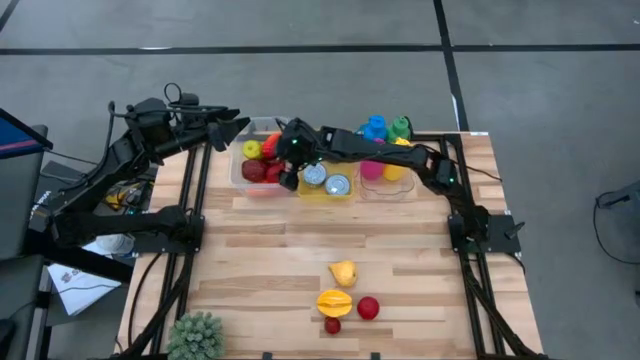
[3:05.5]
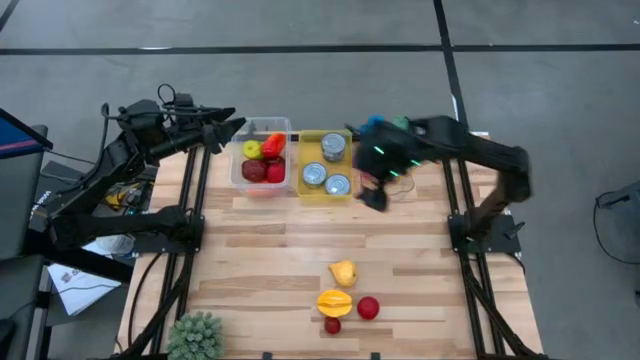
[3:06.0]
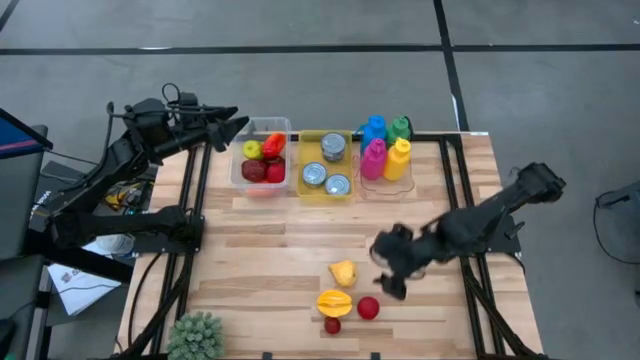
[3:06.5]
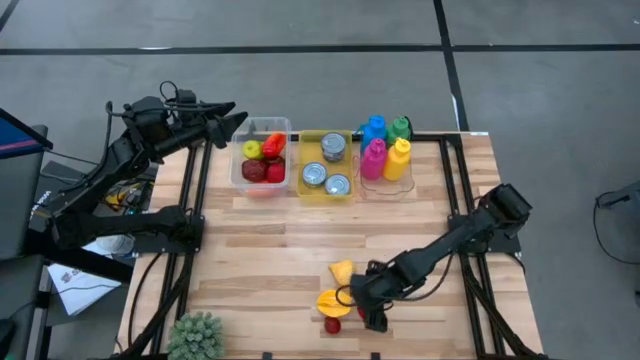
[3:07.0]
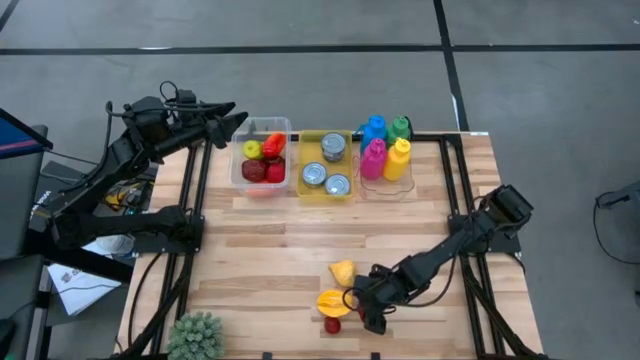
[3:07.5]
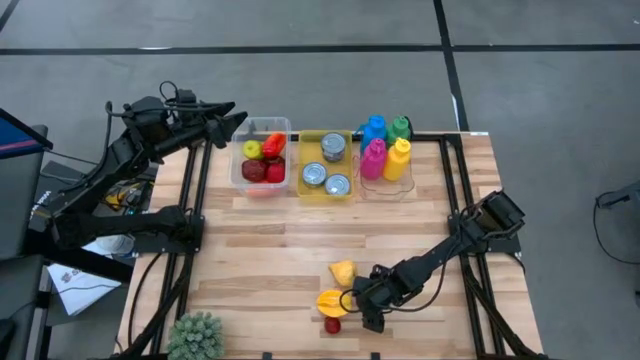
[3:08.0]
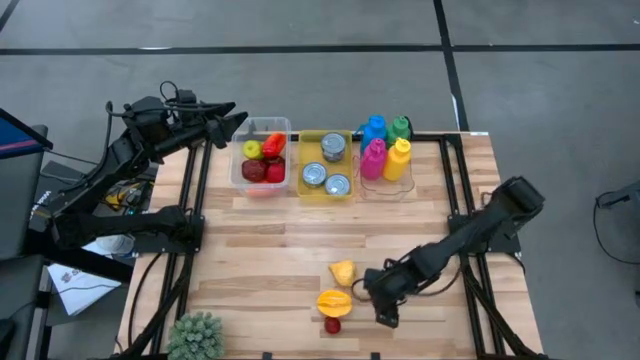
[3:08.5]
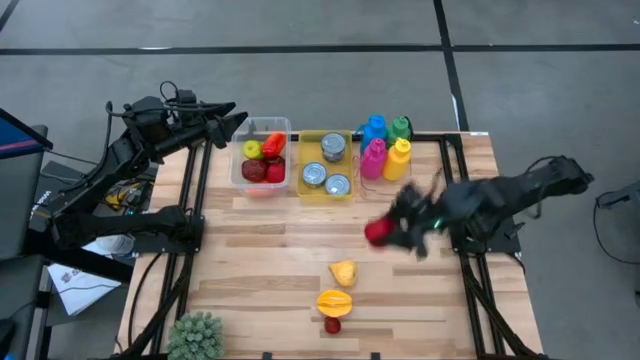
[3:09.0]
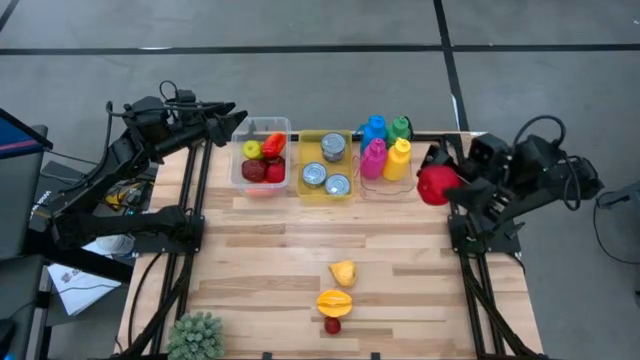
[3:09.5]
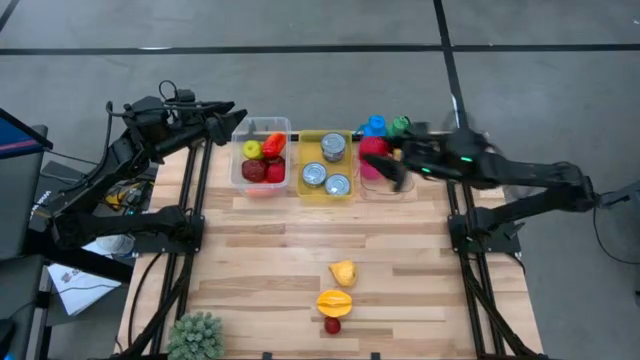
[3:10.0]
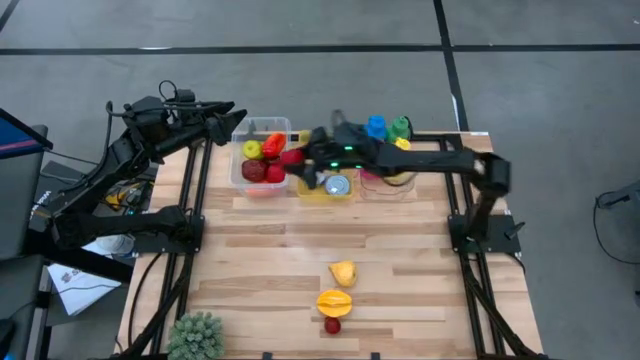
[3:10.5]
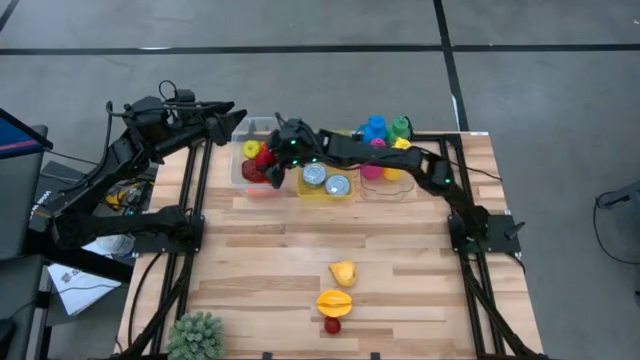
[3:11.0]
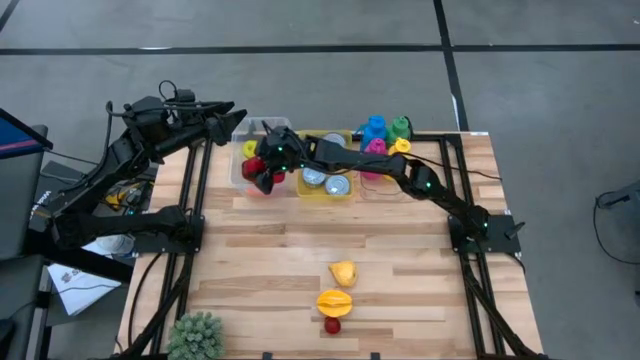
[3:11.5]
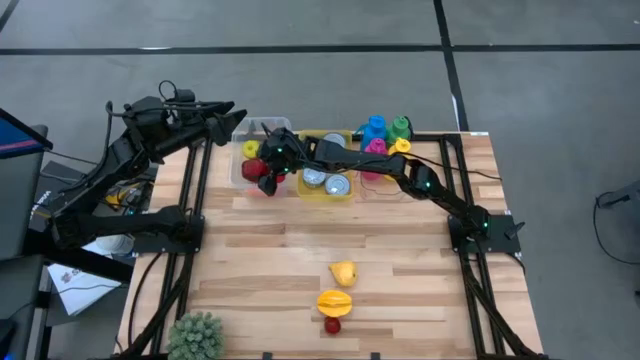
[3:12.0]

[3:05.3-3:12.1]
Task: Pick & Place Food Item
Put the tomato into the transparent container

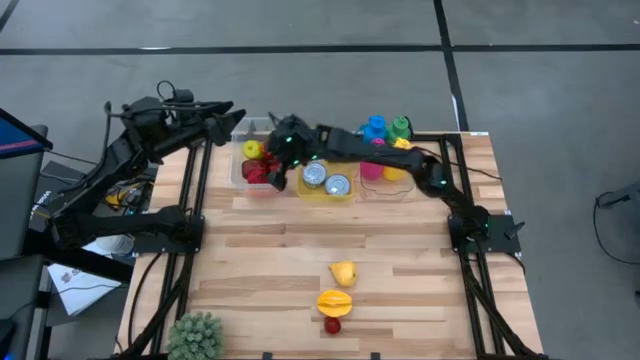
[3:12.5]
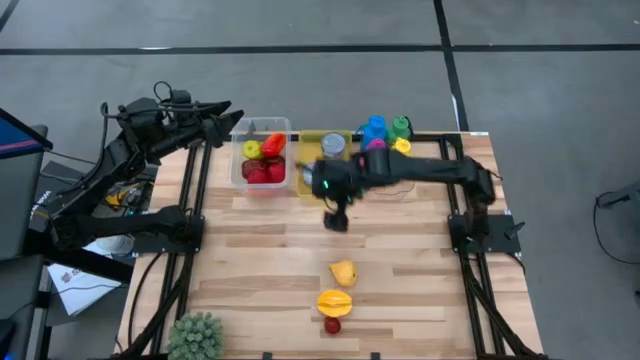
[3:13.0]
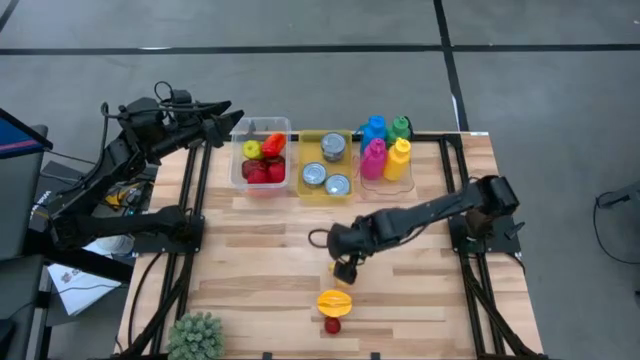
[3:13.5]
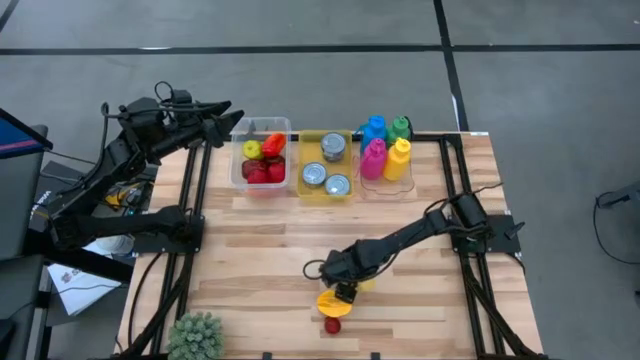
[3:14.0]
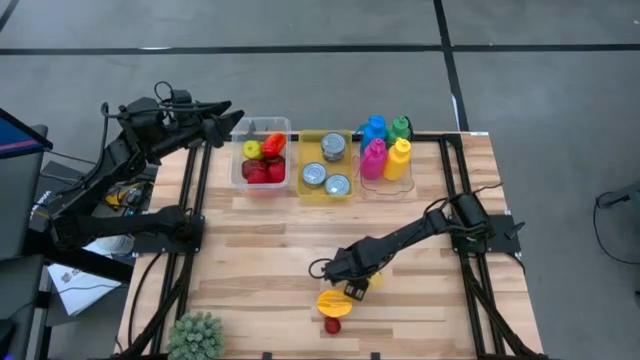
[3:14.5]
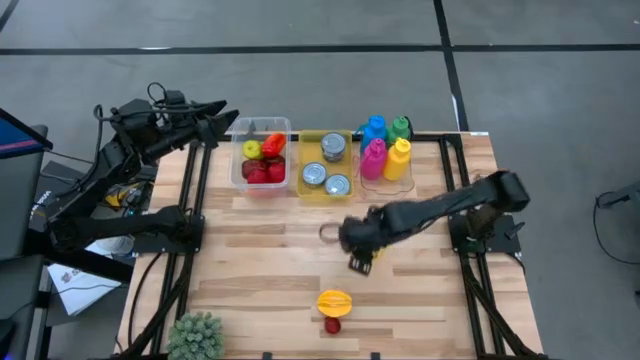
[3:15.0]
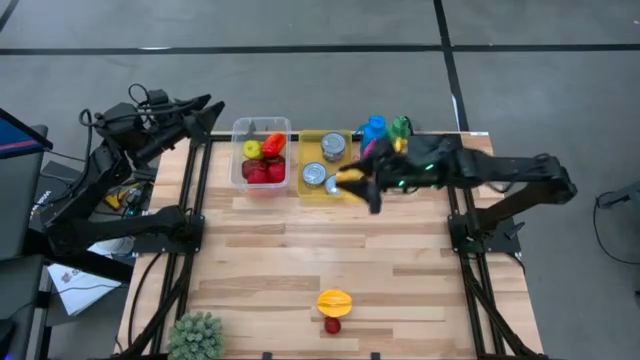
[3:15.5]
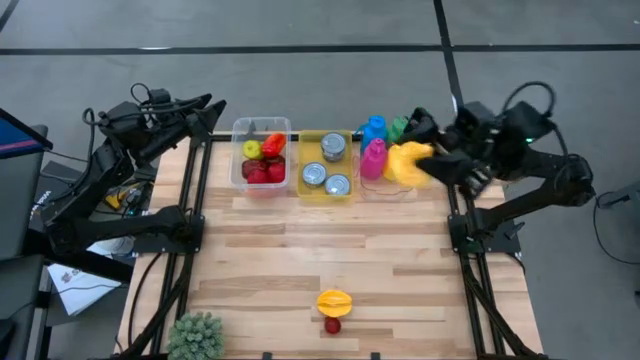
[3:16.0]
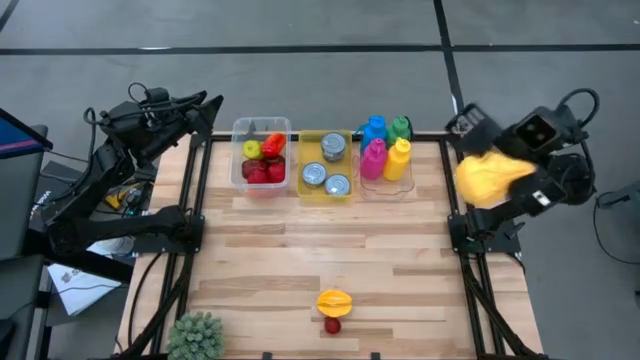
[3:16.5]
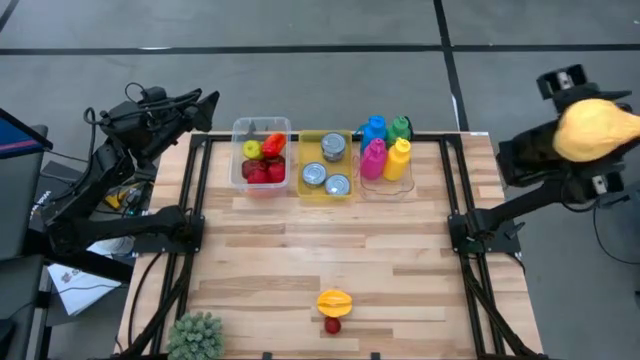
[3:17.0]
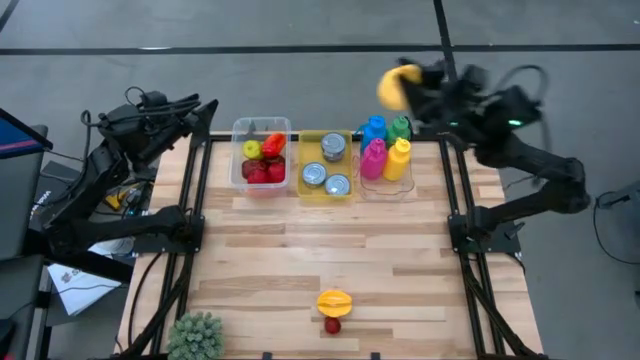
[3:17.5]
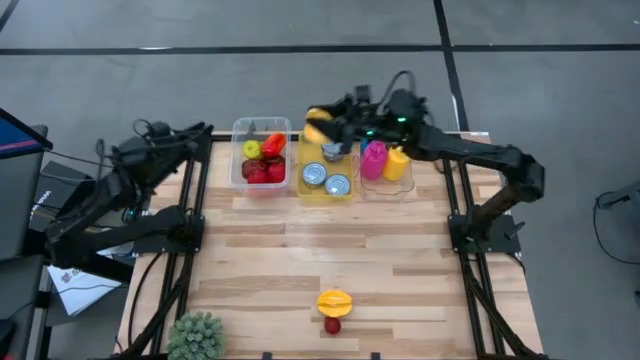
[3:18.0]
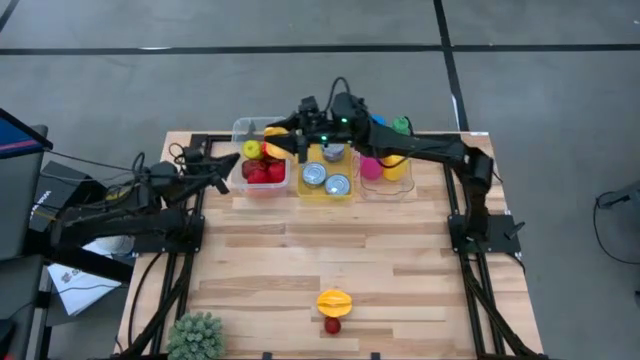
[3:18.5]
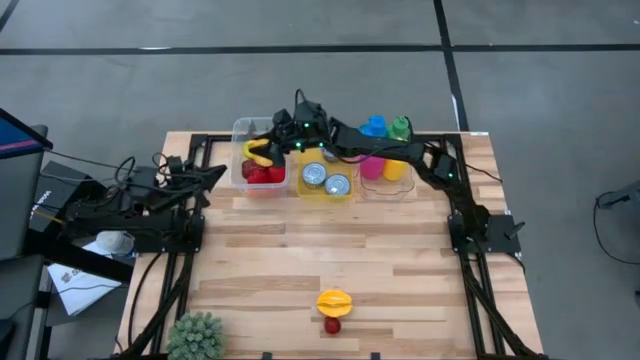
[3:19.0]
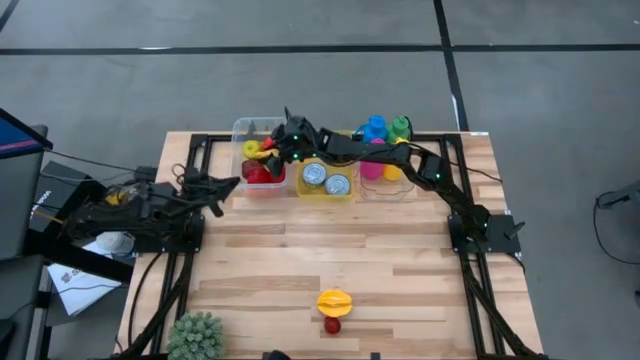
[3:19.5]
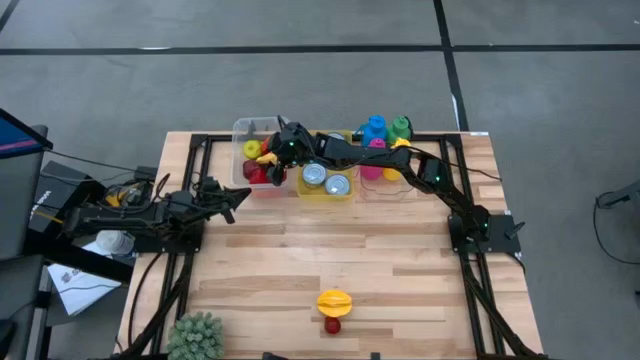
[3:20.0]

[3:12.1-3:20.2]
Put the pear into the transparent container

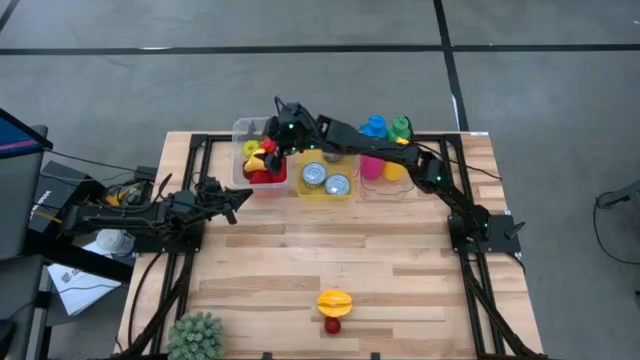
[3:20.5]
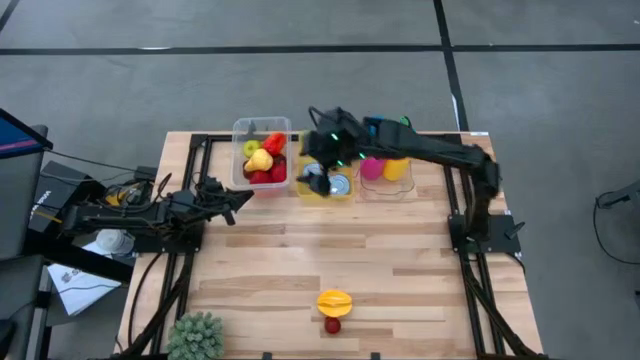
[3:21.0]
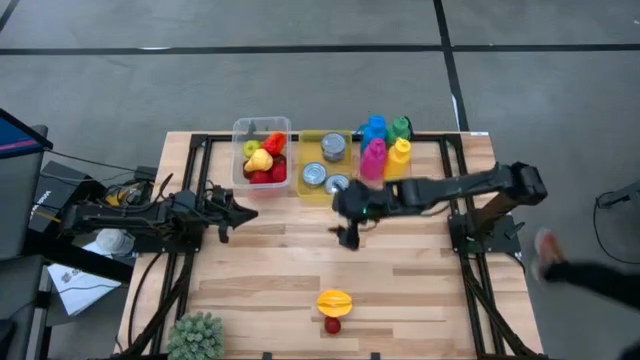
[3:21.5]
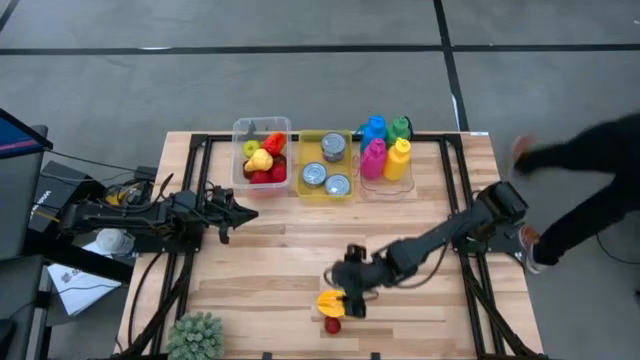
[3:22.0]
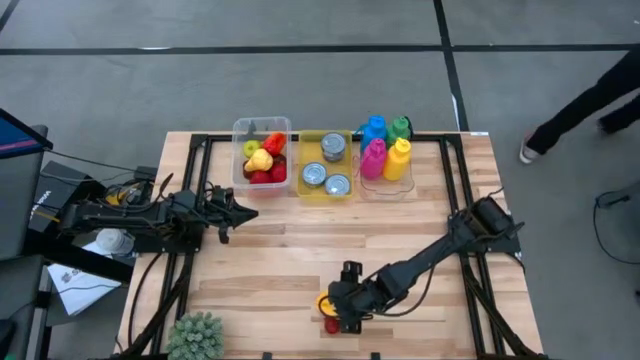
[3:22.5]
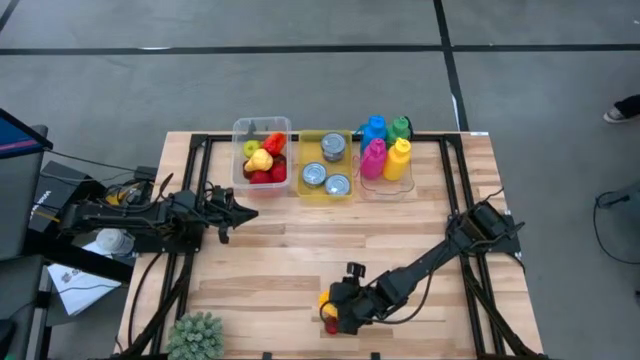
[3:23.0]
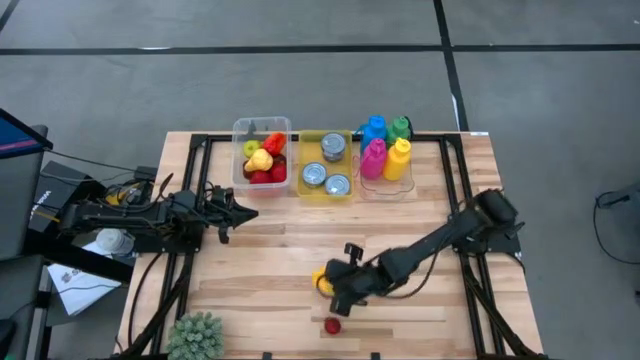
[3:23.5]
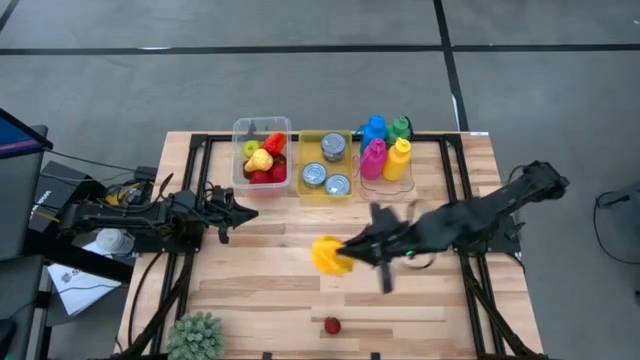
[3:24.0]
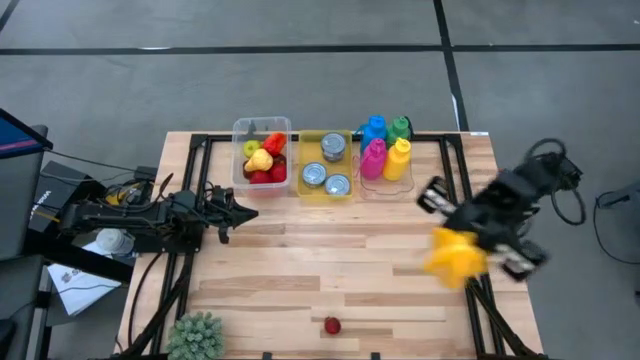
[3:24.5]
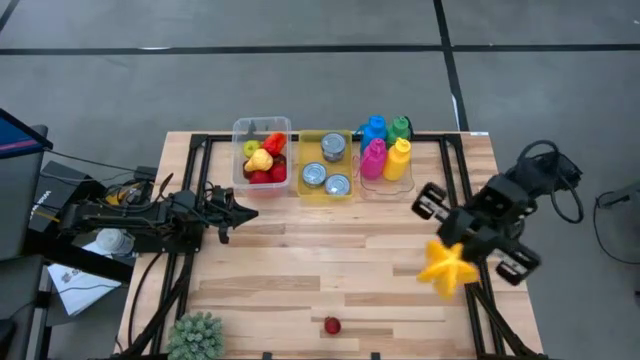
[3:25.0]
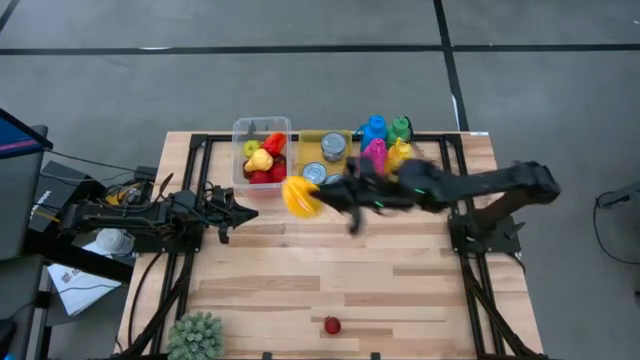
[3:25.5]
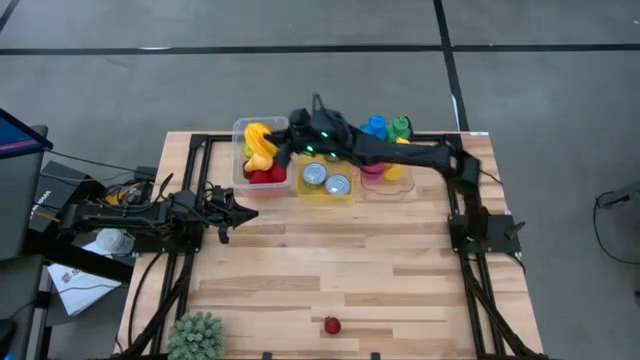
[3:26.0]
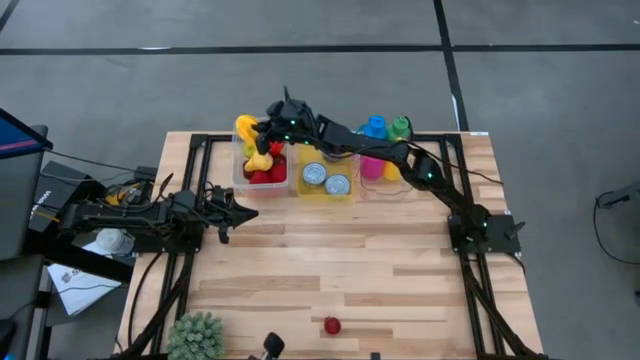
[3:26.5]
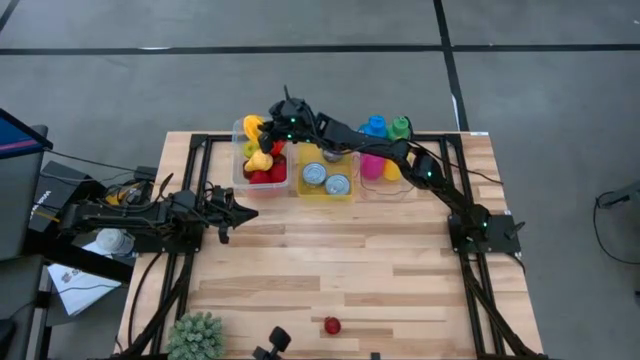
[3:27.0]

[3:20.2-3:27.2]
Put the starfruit into the transparent container
